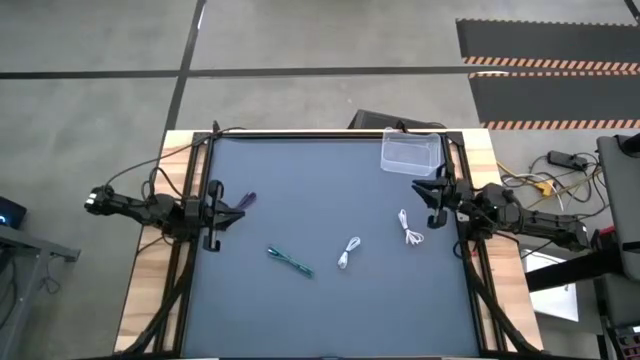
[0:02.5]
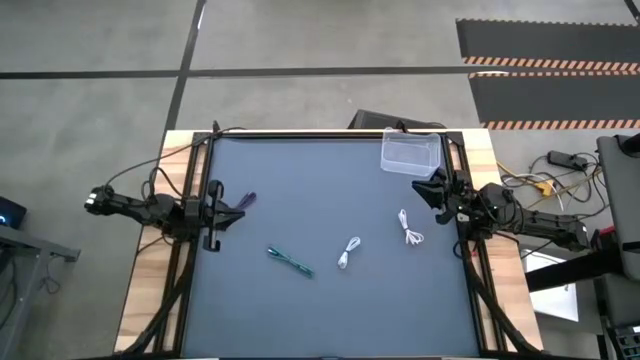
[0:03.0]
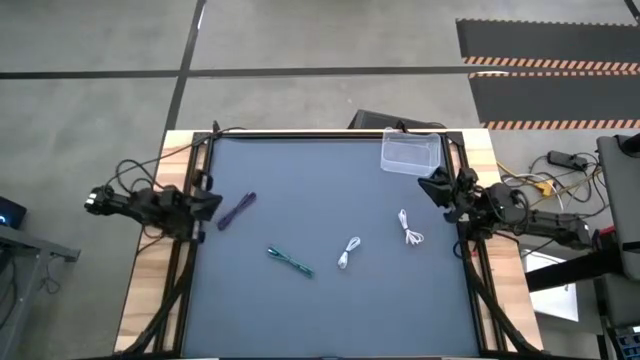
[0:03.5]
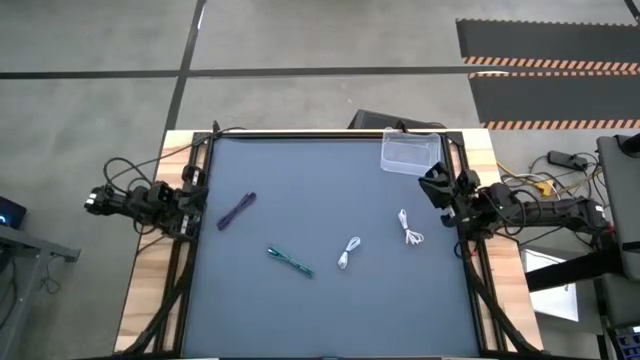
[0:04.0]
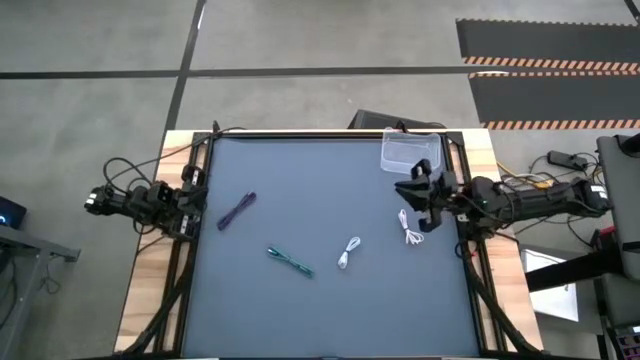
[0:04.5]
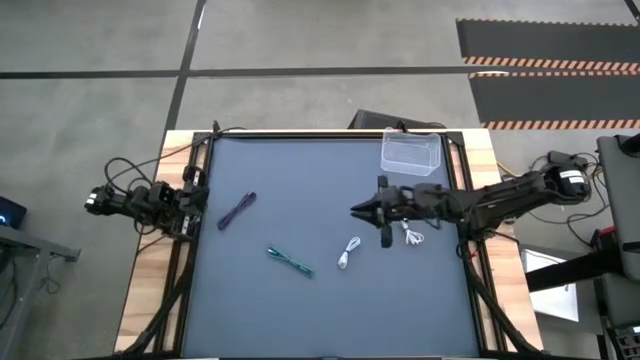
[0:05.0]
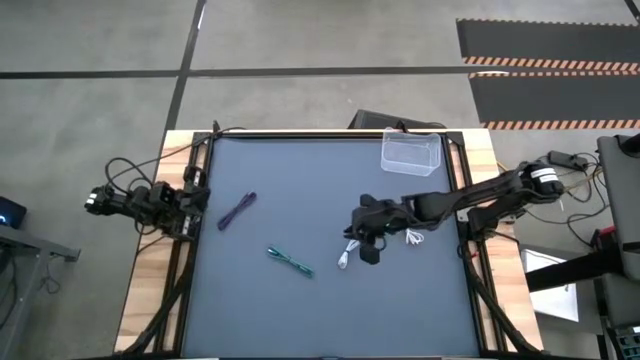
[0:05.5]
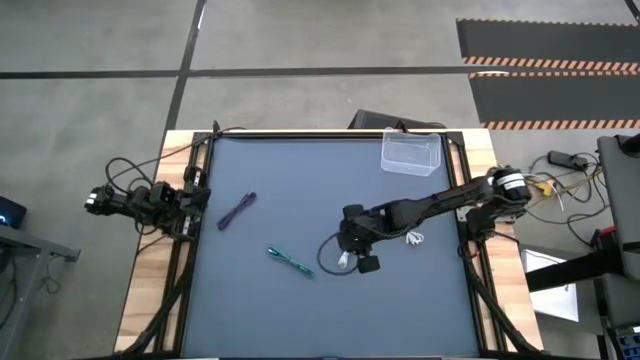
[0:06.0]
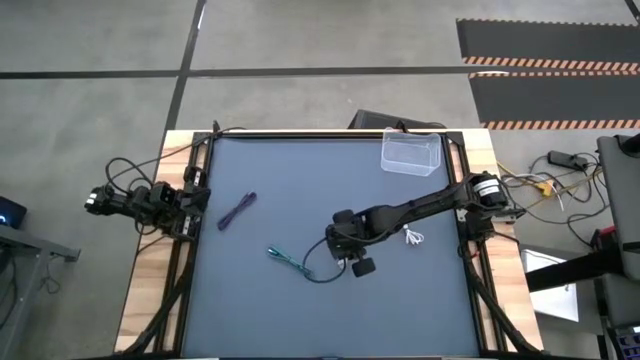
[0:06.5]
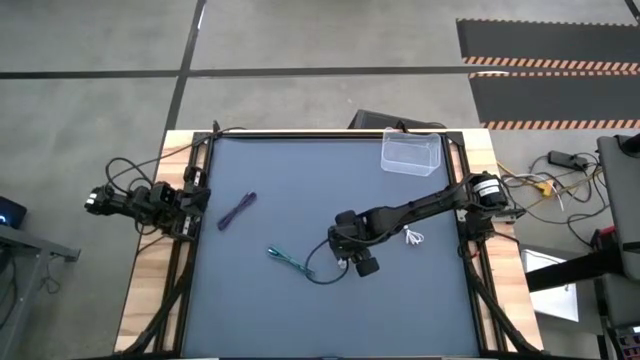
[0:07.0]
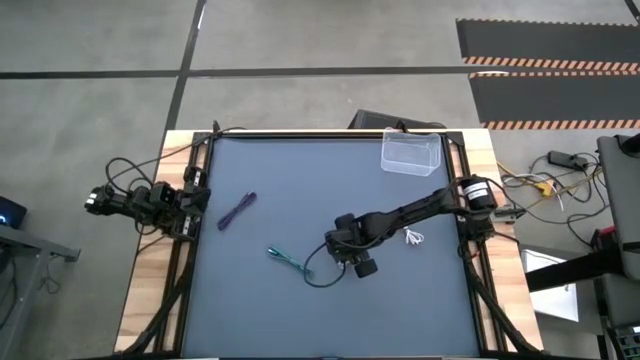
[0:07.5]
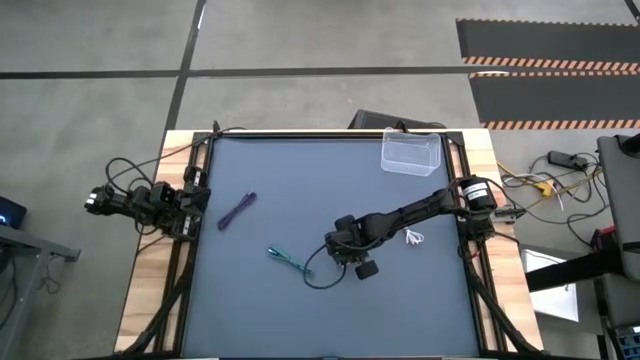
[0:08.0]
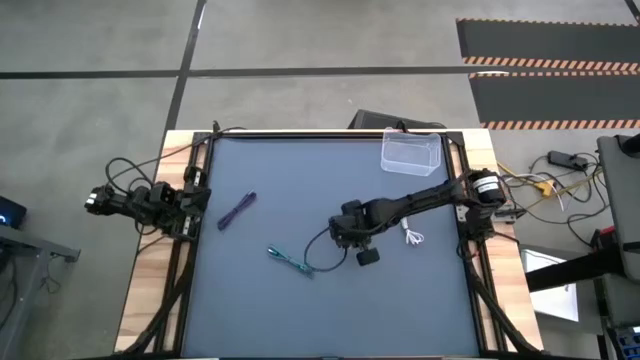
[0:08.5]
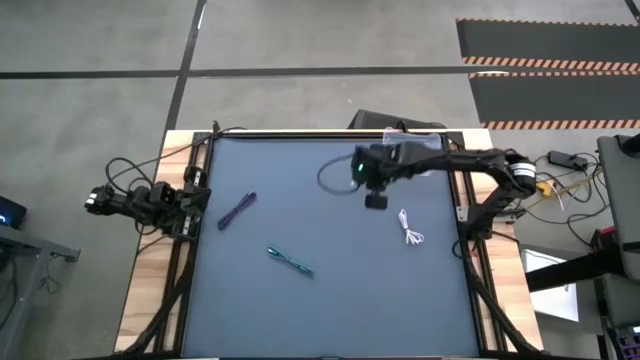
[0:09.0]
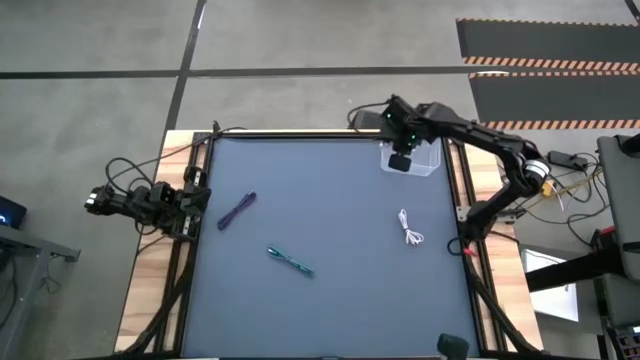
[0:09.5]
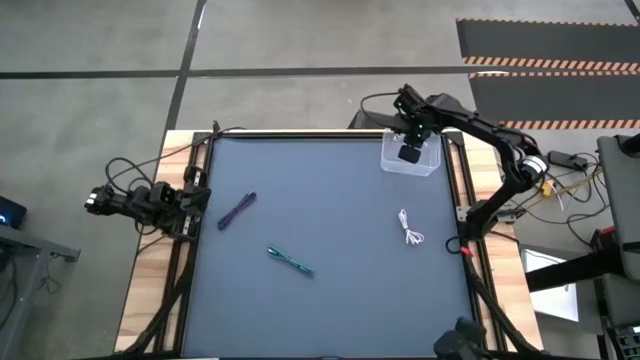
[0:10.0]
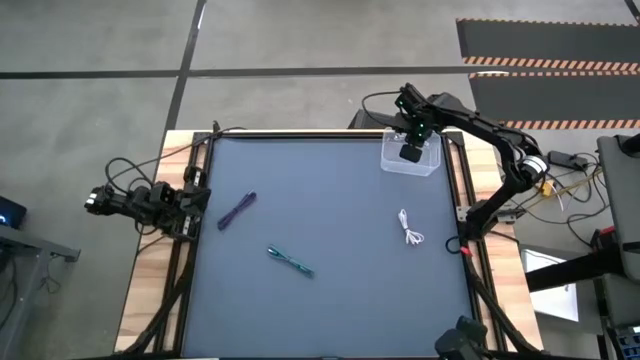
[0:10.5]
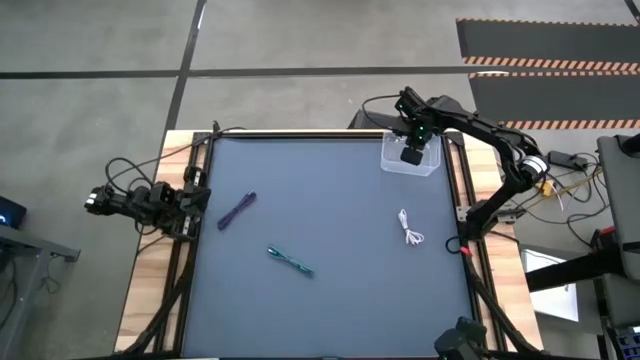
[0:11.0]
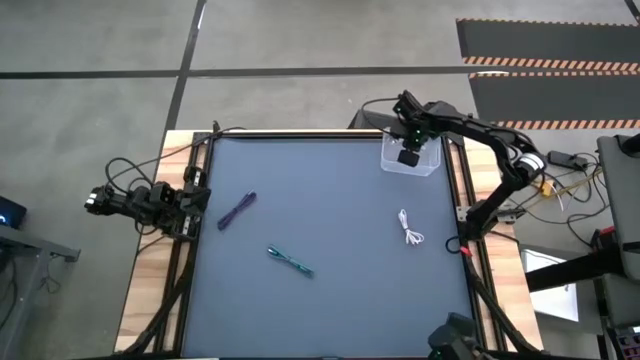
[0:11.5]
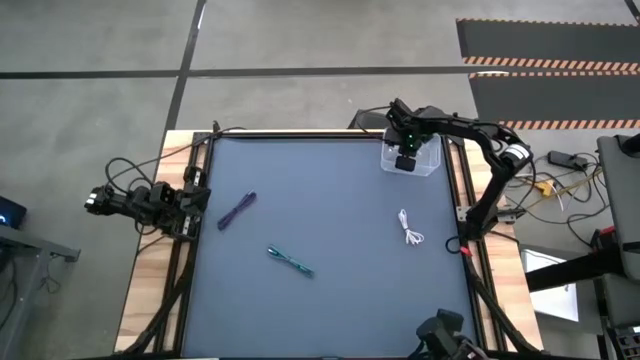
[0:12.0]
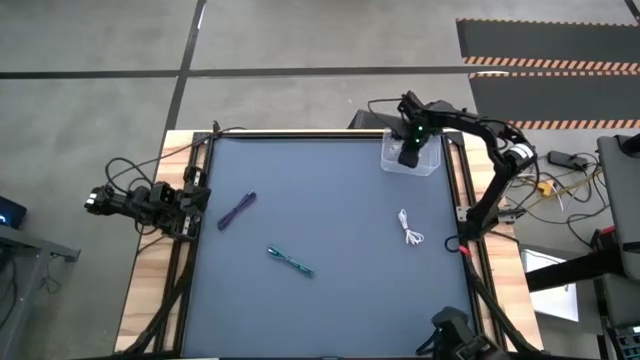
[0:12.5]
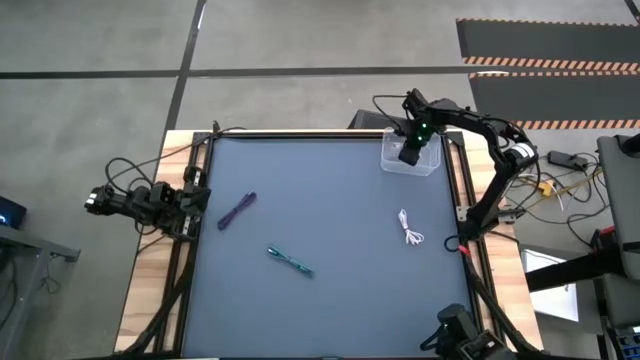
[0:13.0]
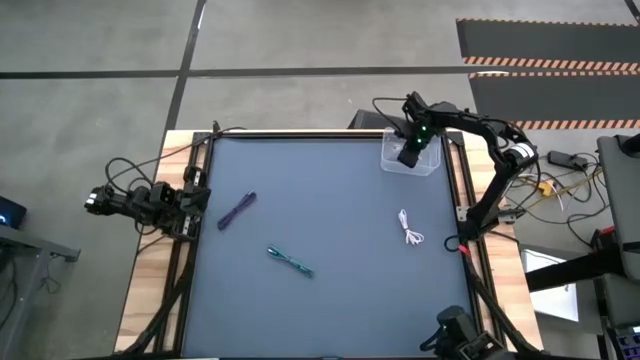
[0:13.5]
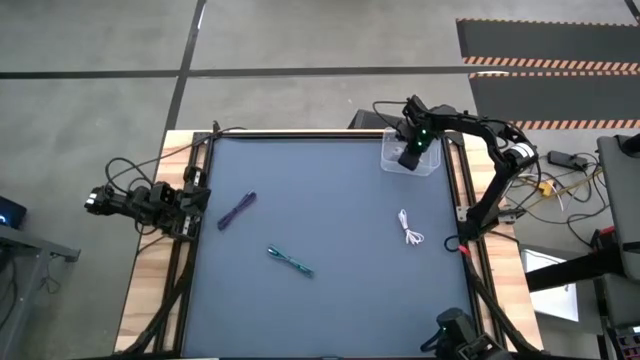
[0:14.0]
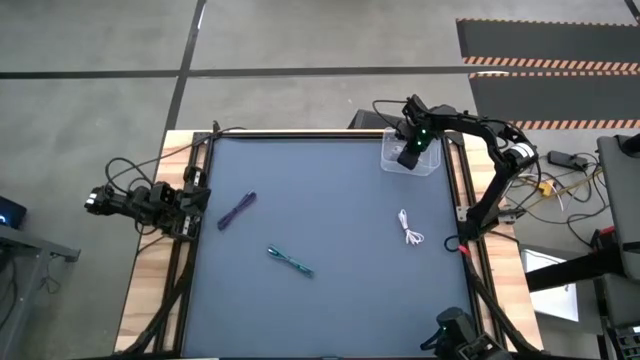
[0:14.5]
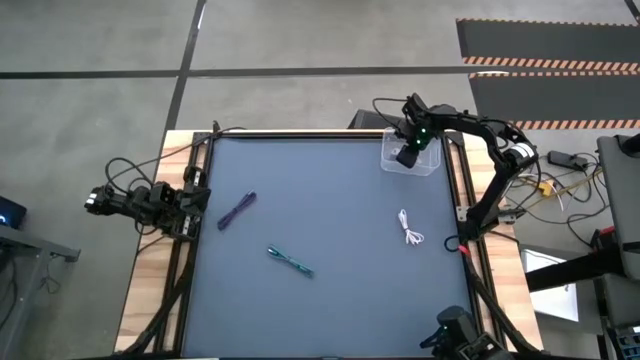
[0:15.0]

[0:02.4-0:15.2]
Task: Pick and place USB-C Cables
Put the left white charger cable into the bin

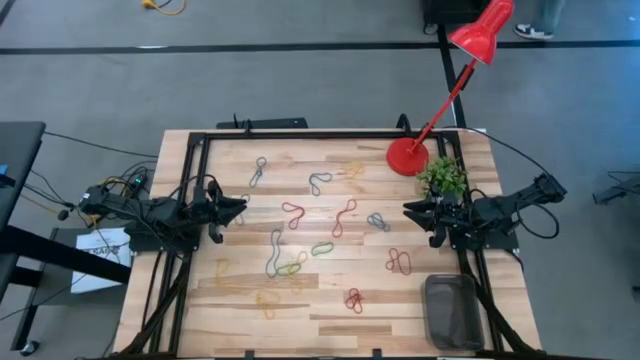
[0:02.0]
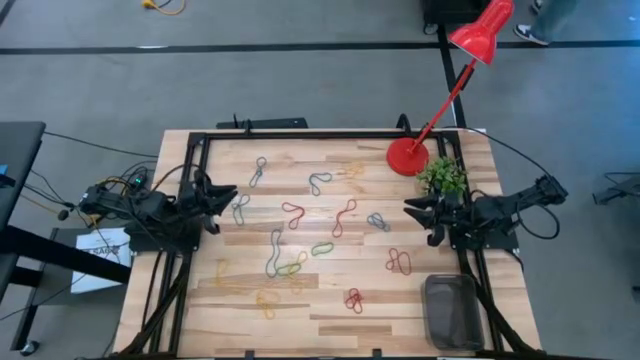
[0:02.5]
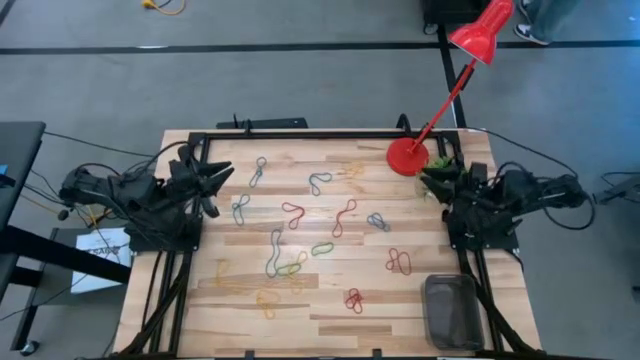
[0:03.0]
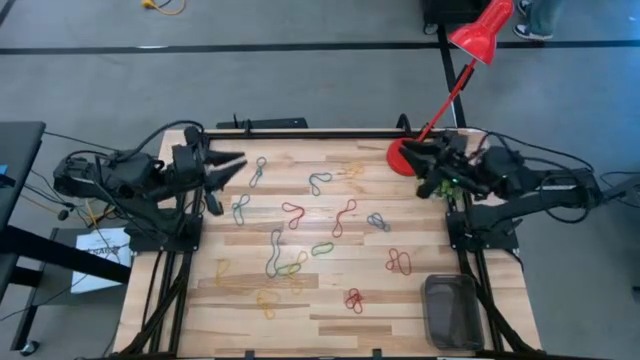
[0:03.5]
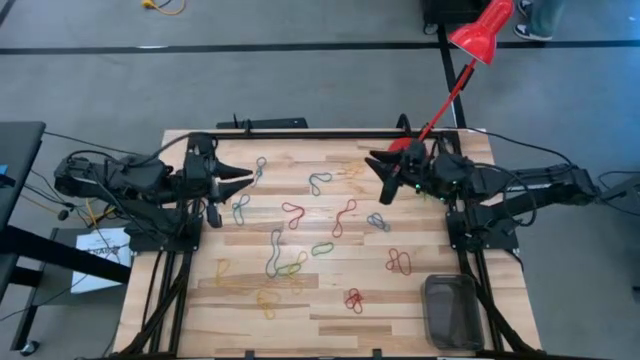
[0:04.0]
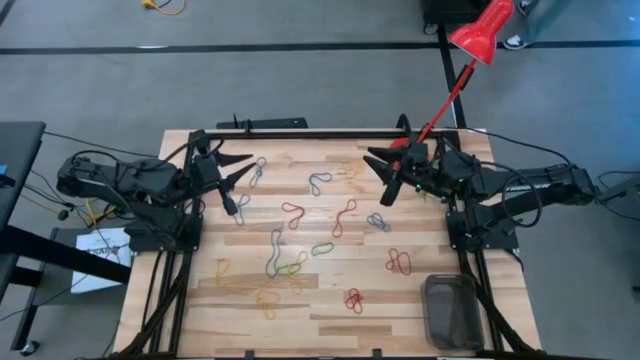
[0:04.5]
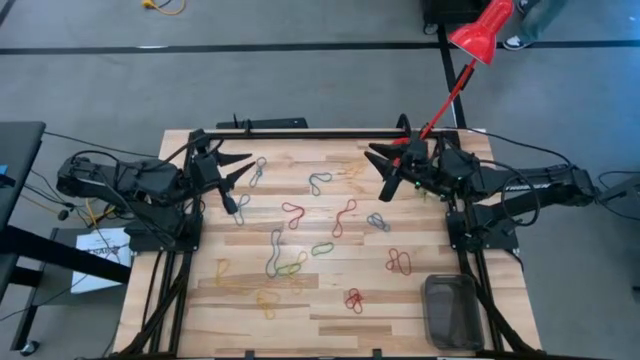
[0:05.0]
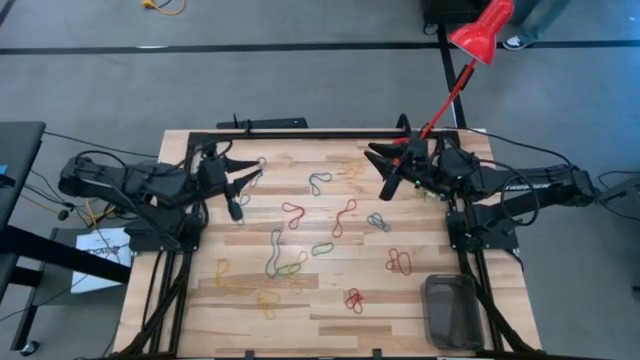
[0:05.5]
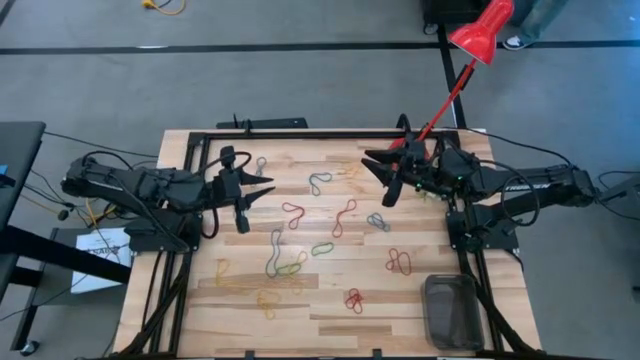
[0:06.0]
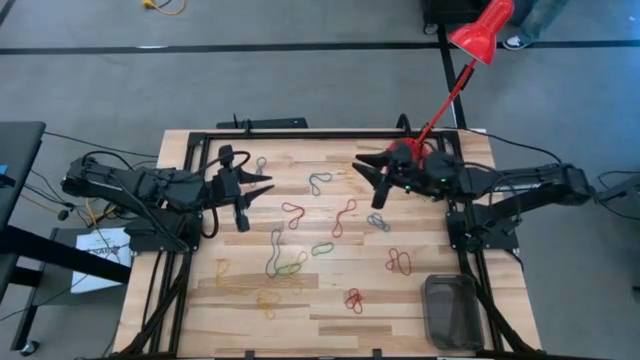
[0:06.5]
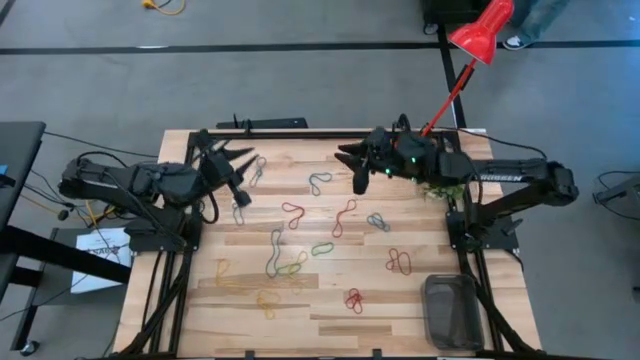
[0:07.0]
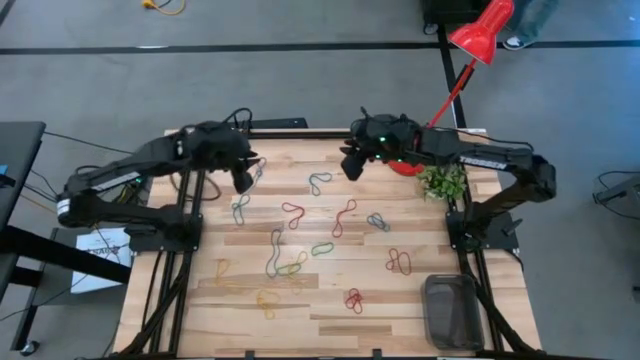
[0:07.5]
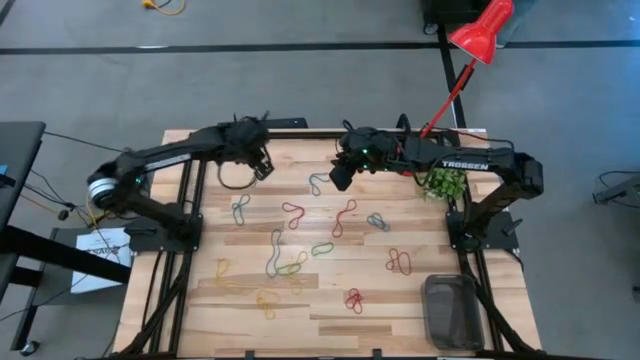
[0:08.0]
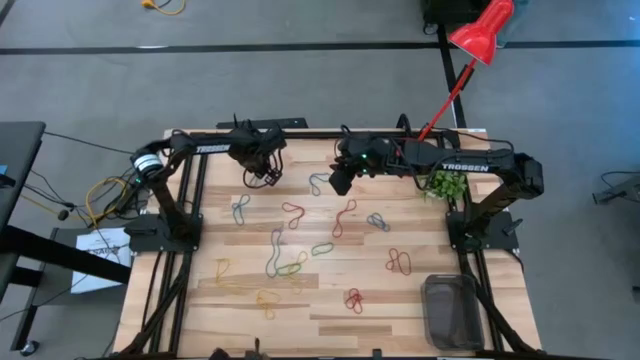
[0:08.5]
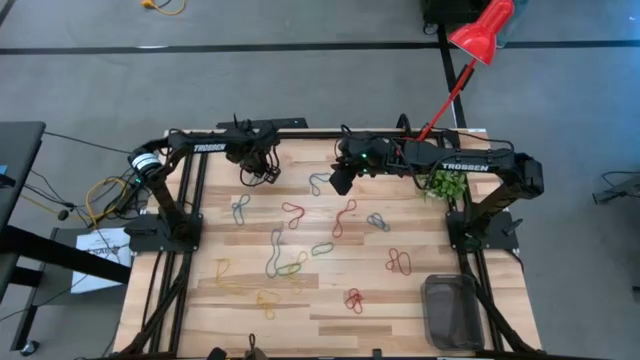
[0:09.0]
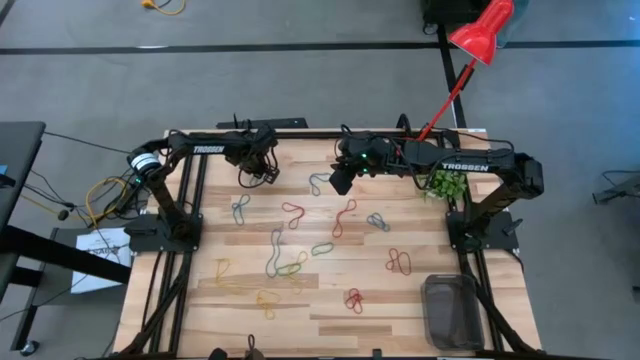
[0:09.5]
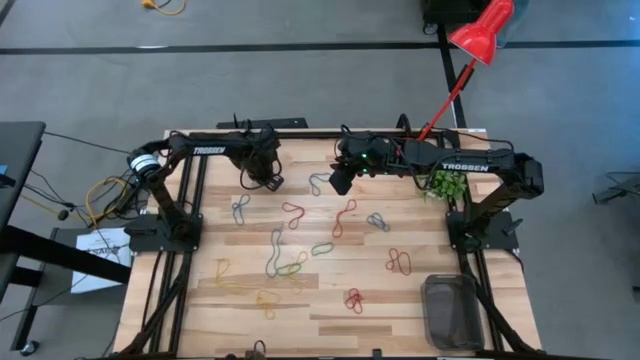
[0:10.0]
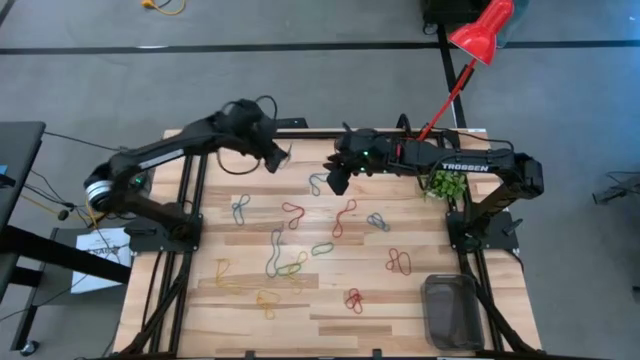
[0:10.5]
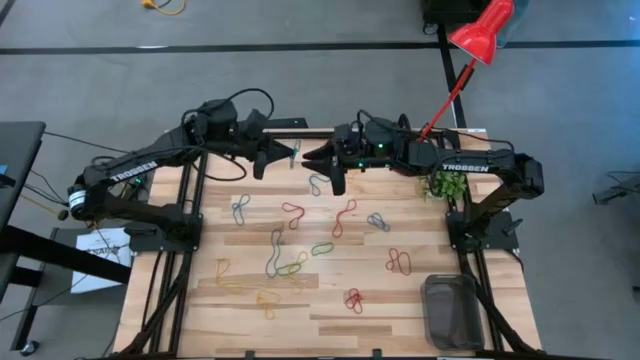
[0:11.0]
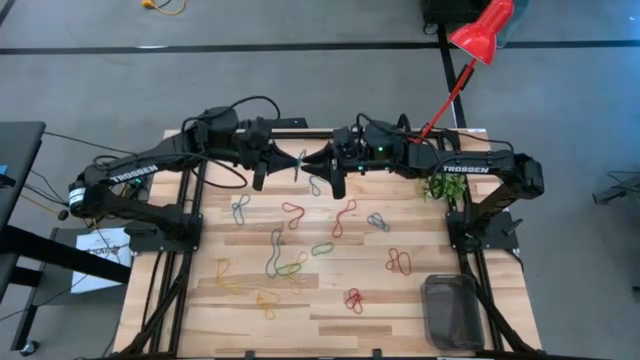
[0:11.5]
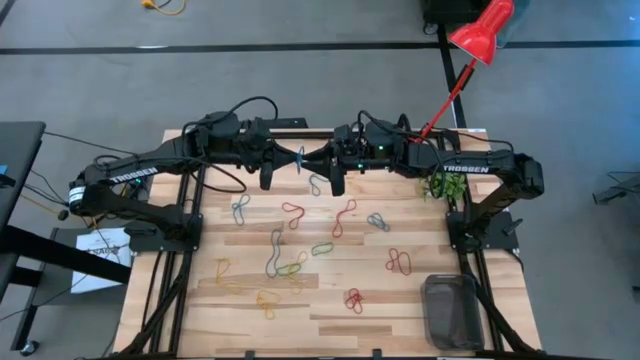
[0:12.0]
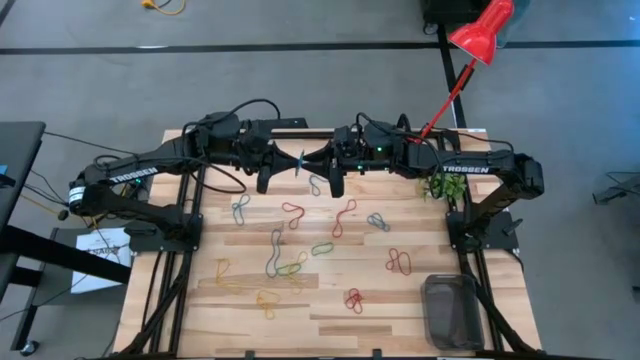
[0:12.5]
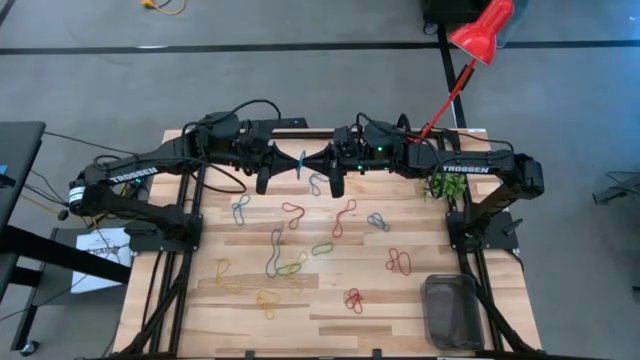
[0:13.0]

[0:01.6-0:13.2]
Task: Pick and place items into bin
Put the blue rubber band into the black bin
